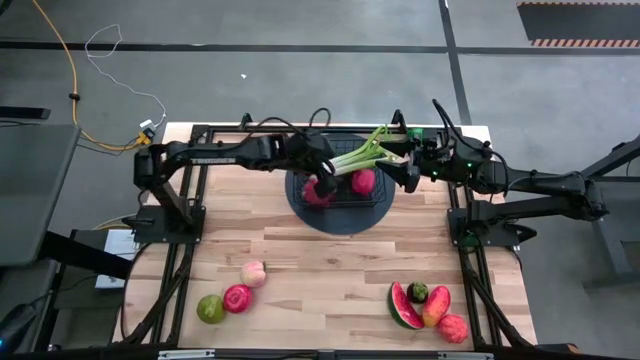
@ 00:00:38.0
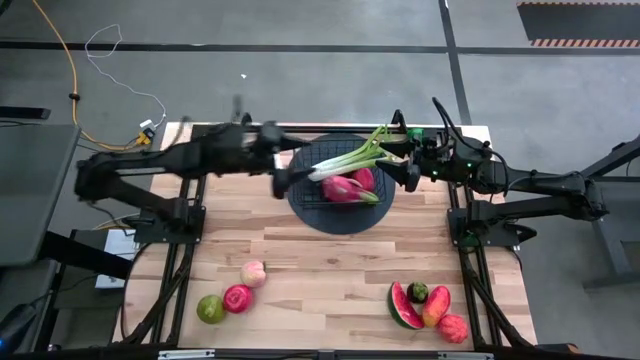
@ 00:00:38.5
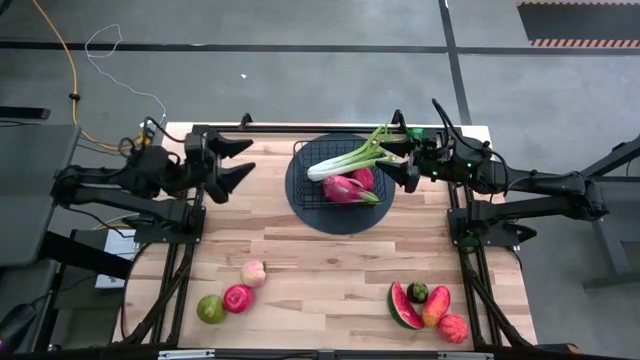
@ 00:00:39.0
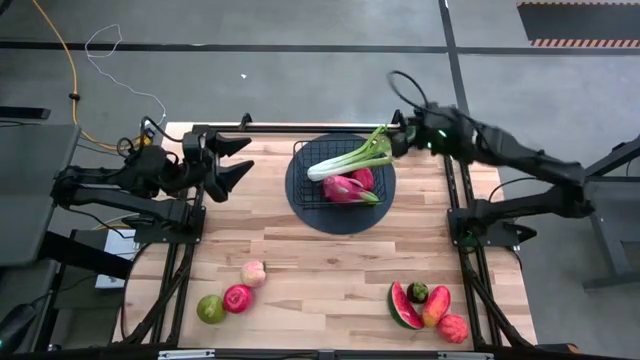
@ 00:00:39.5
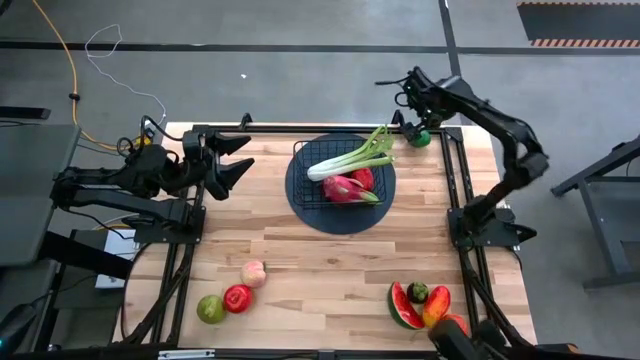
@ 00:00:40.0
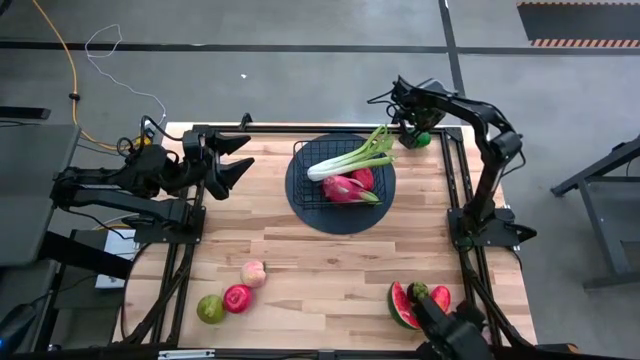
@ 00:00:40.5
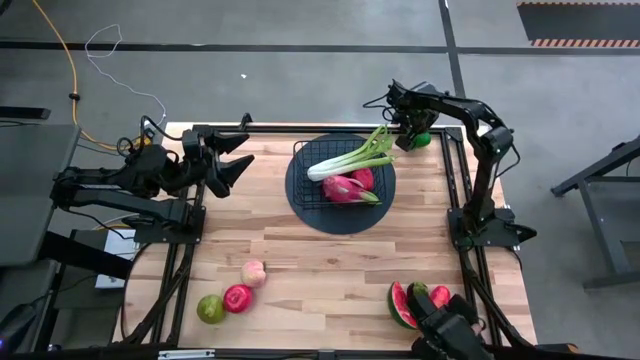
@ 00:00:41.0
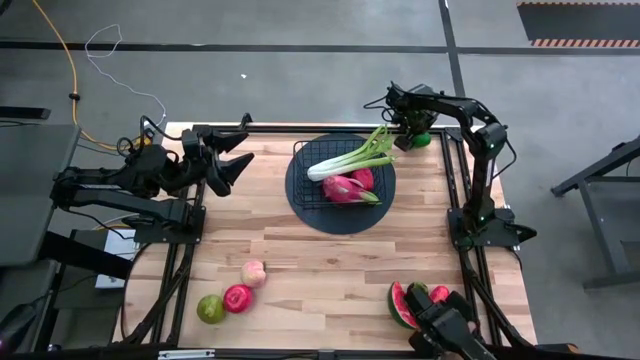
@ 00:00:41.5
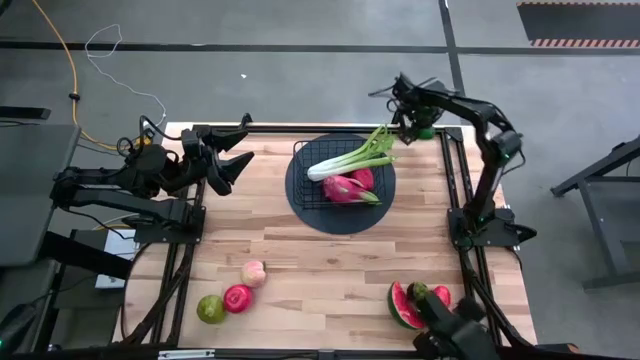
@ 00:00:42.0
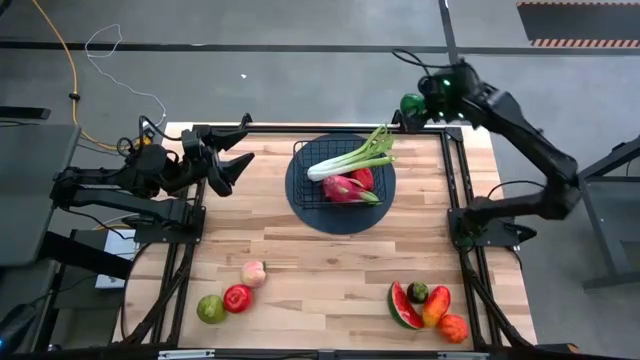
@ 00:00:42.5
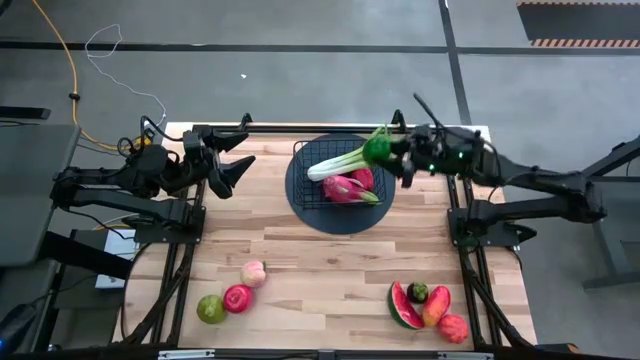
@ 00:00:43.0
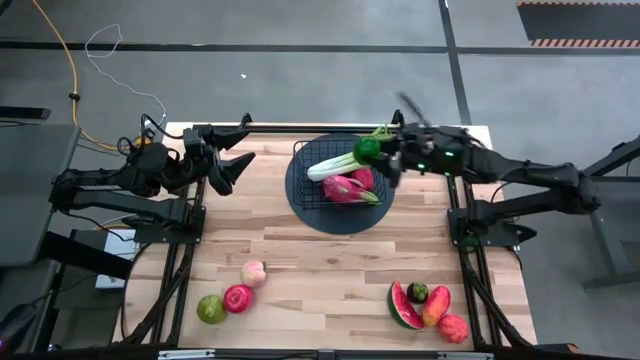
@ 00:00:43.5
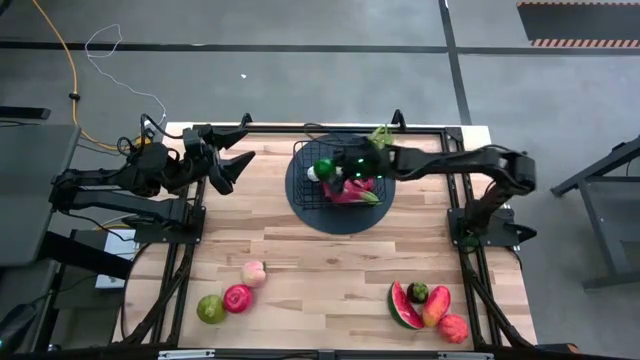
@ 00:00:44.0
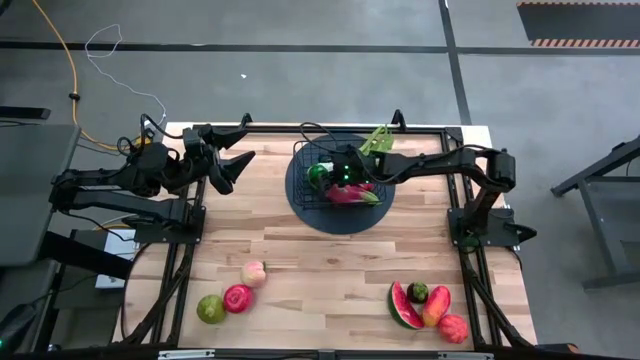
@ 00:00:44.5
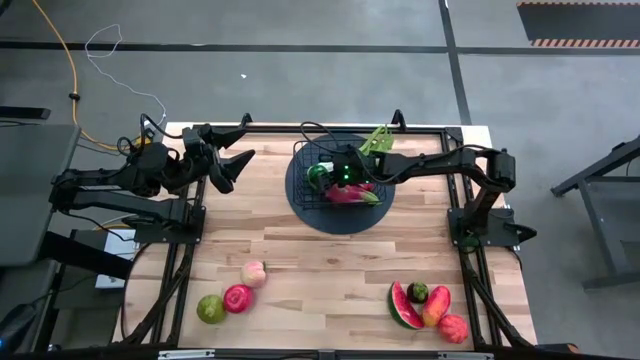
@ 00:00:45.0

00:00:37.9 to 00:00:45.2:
Task: Build produce basket
Put the lime into the wire basket

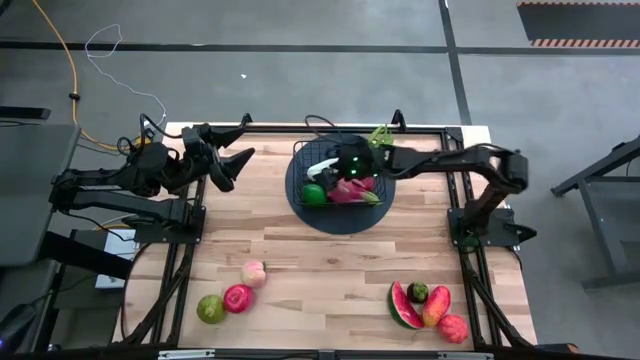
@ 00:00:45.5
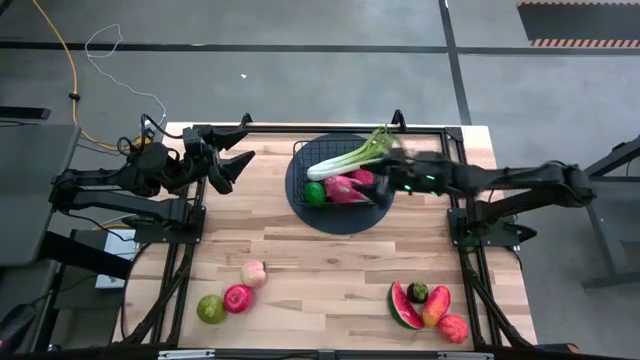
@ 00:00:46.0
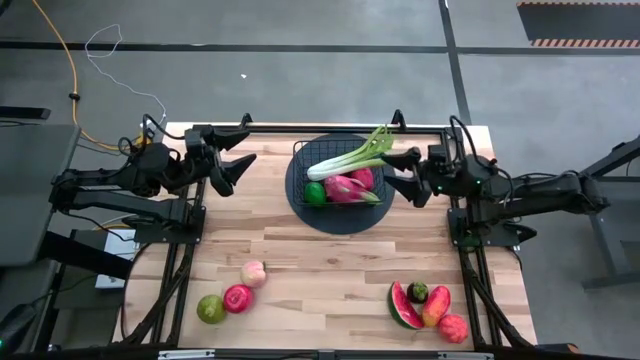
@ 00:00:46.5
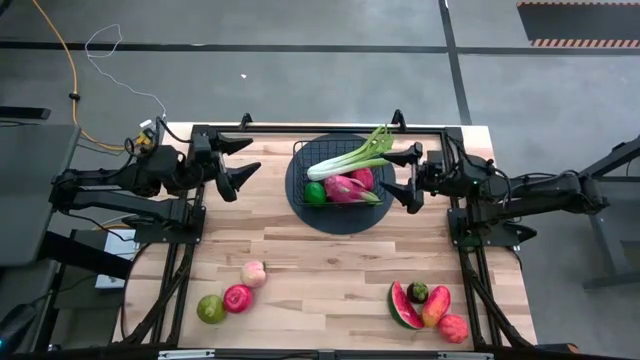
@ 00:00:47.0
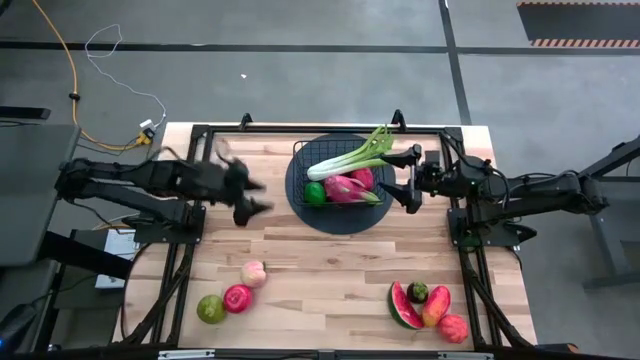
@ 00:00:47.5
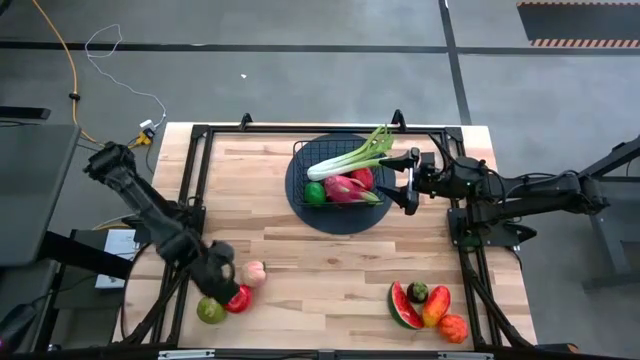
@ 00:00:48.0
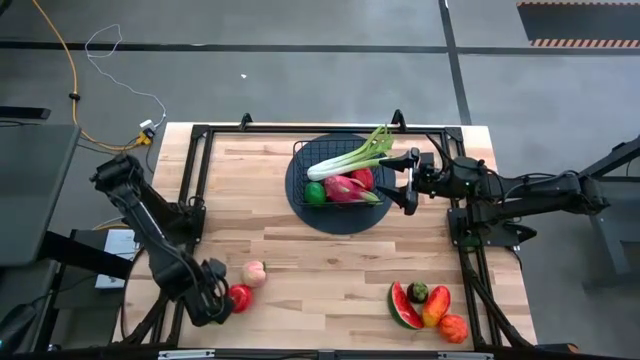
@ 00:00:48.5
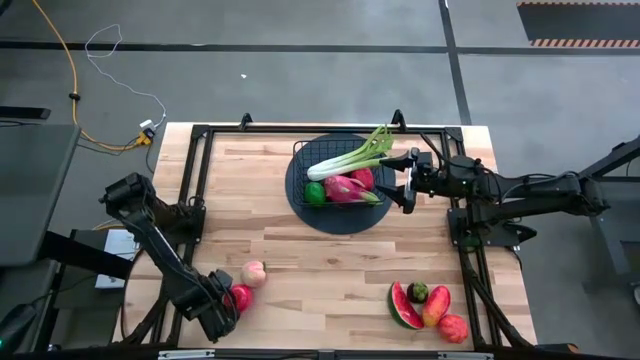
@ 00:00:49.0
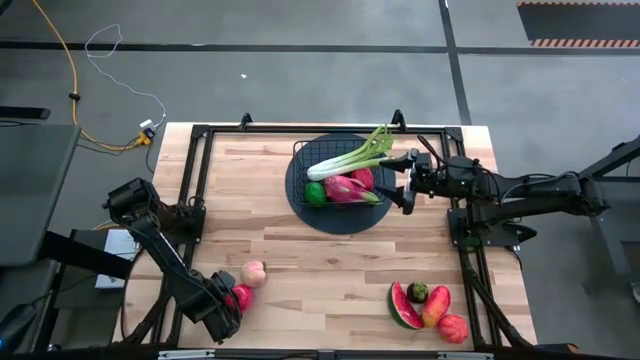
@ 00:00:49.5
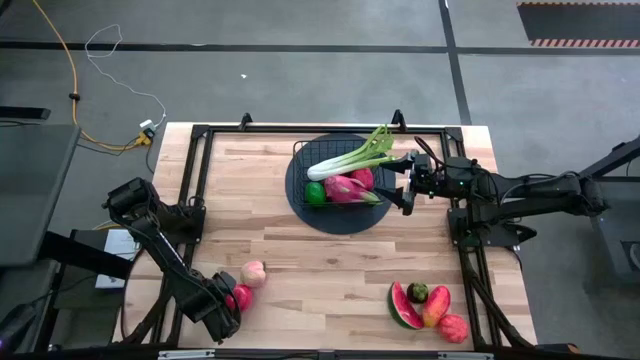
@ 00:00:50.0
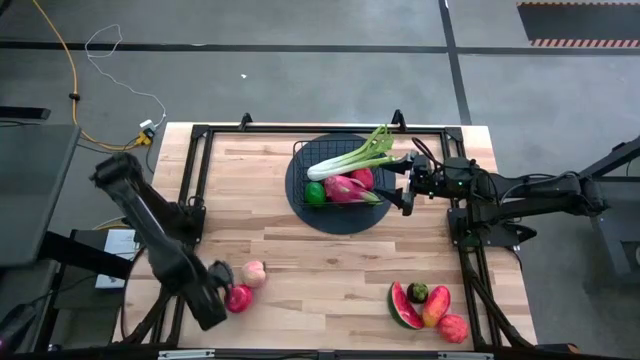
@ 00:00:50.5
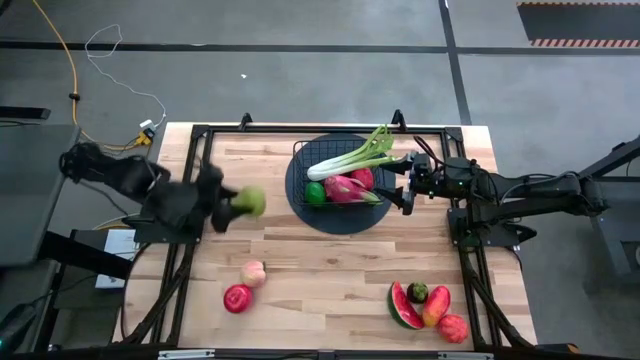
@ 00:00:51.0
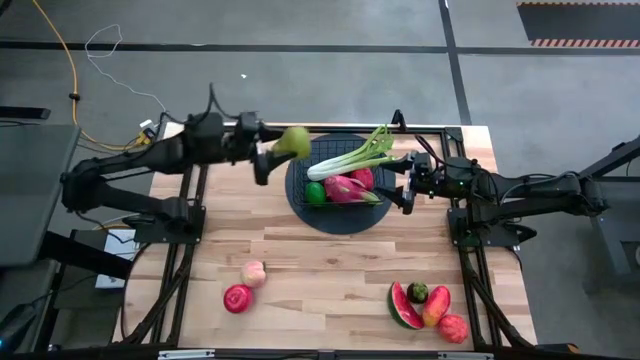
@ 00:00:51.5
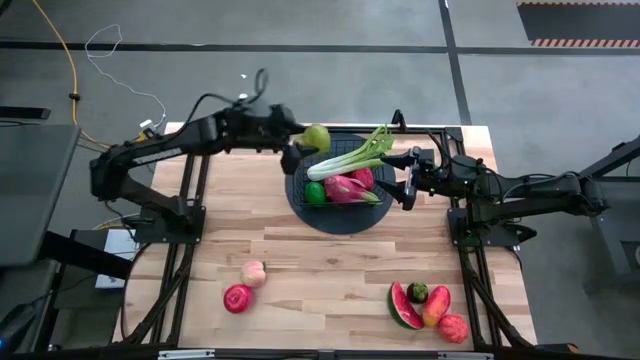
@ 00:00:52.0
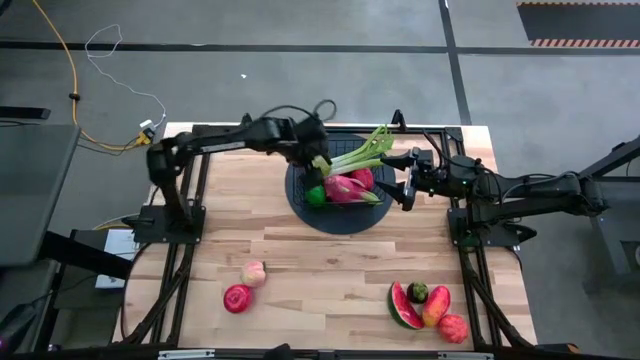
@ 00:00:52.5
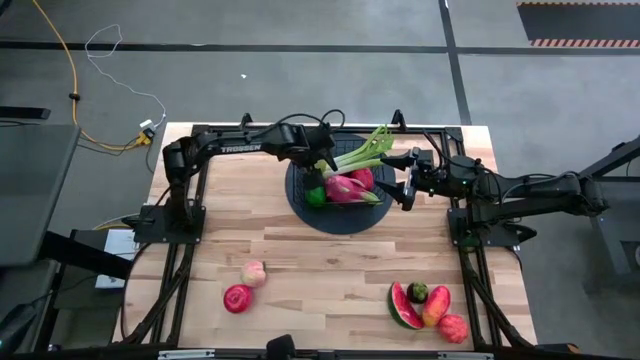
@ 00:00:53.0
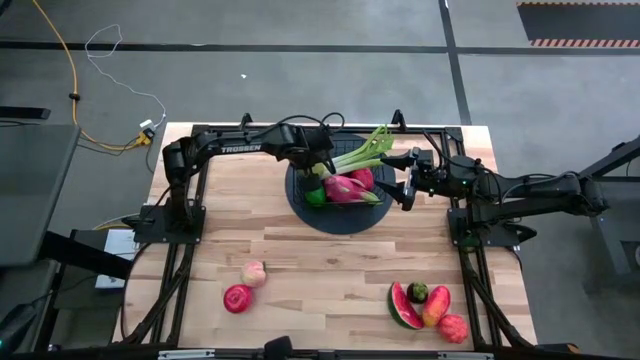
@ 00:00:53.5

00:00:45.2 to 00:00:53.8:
Put the pear into the wire basket

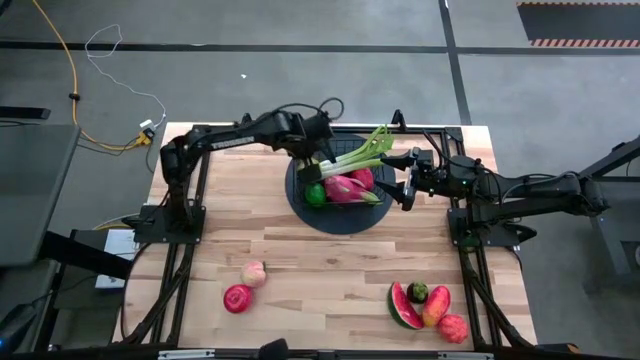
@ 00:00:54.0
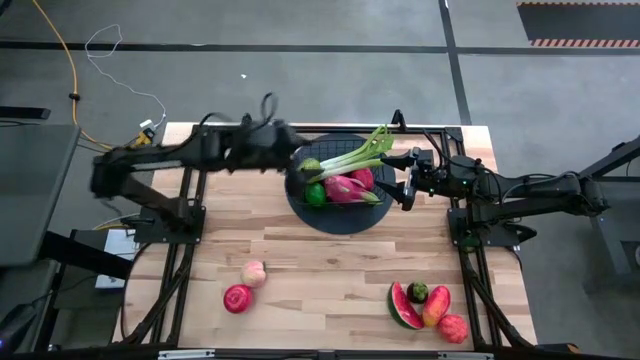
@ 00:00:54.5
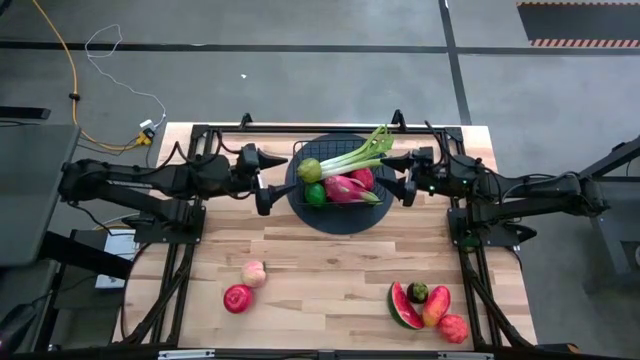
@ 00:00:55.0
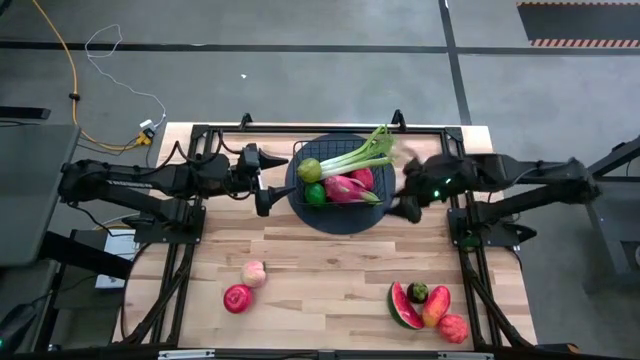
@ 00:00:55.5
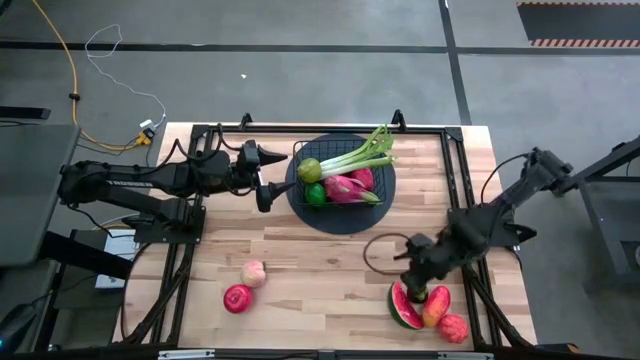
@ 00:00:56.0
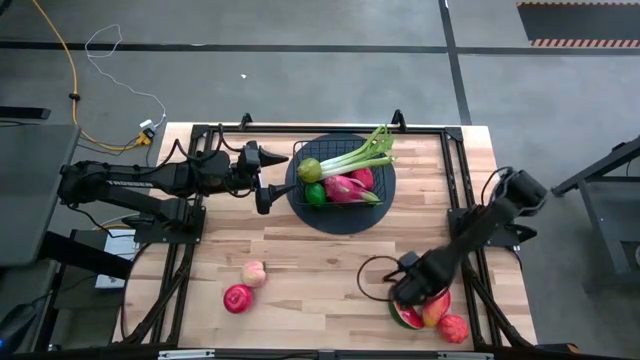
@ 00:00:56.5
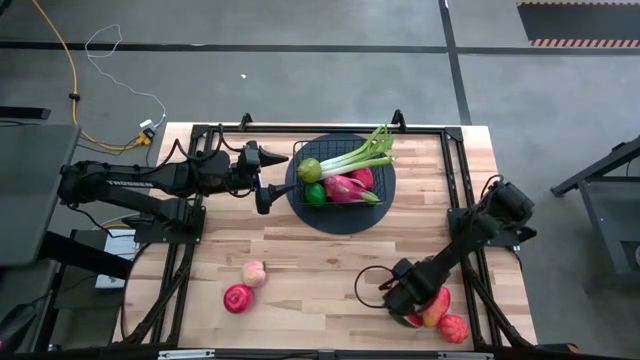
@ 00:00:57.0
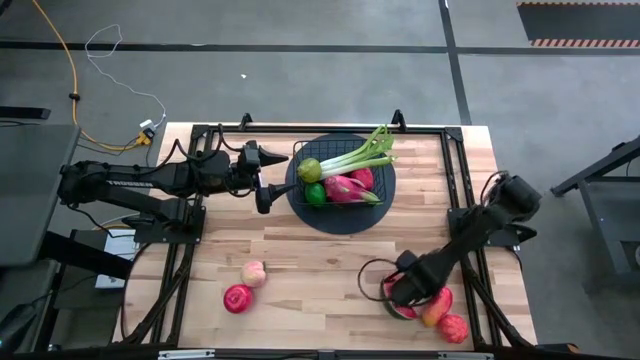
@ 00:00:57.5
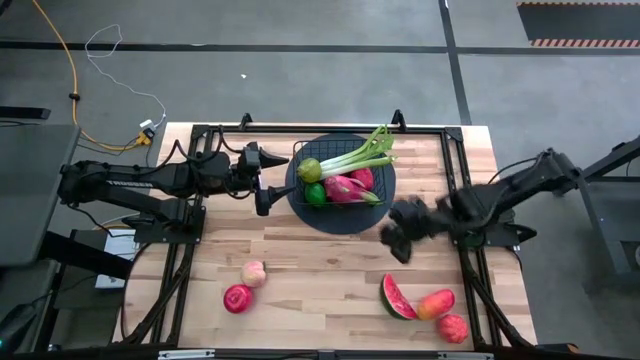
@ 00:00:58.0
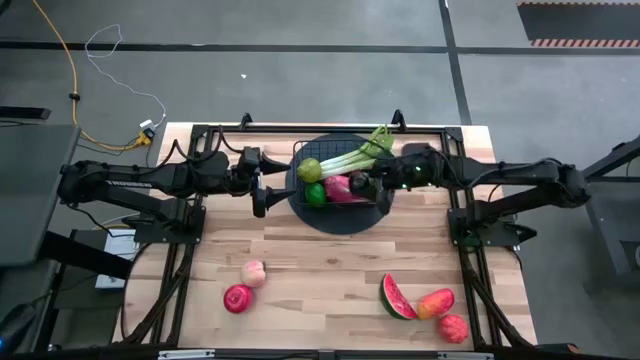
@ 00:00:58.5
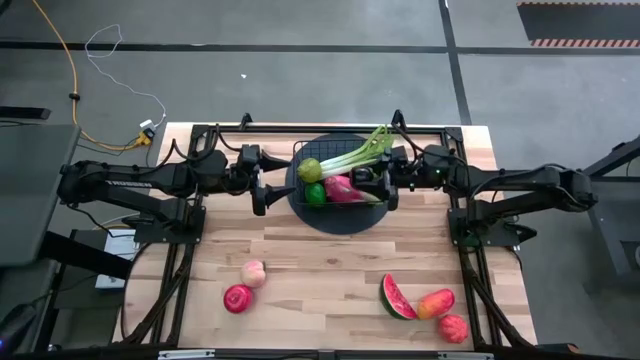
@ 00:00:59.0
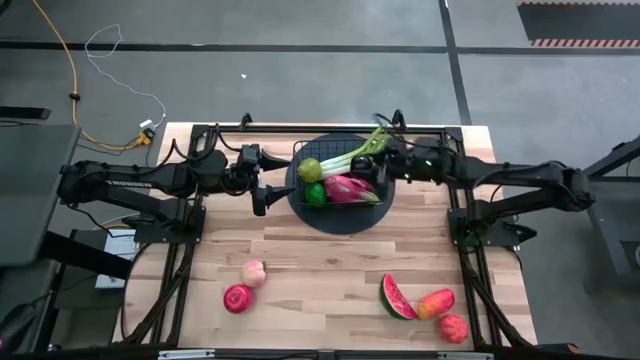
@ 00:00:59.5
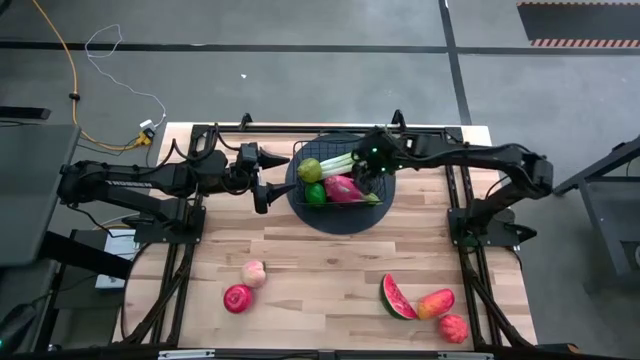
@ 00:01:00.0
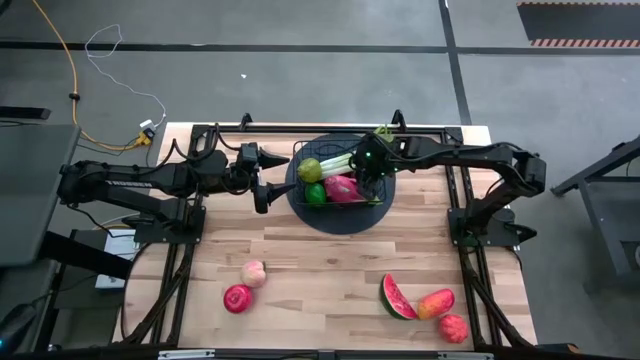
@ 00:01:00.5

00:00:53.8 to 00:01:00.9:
Put the mangosteen into the wire basket
